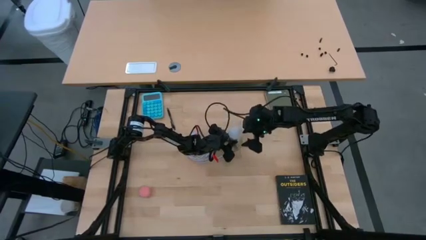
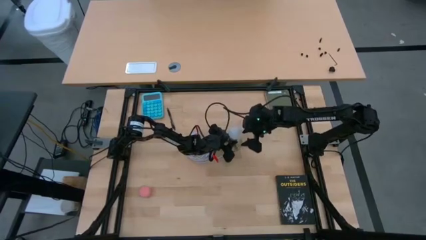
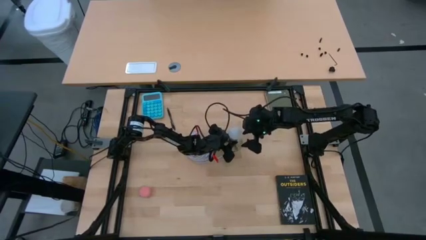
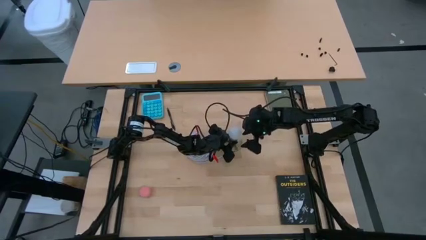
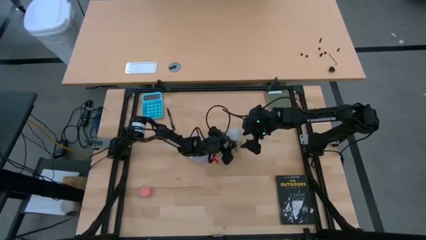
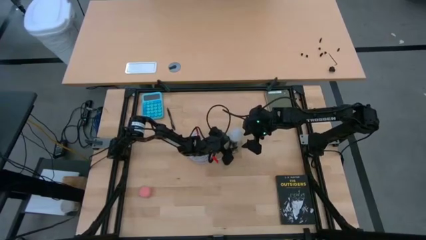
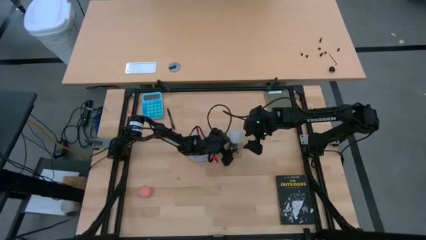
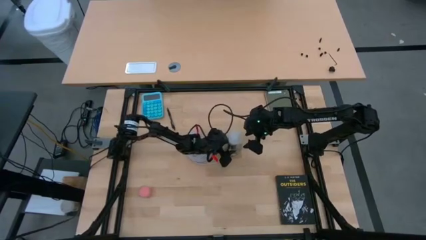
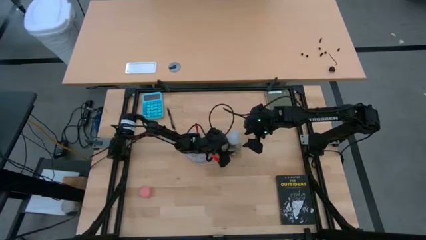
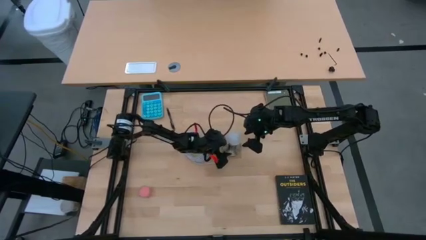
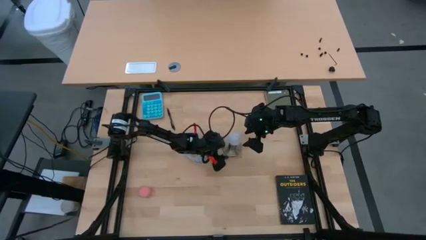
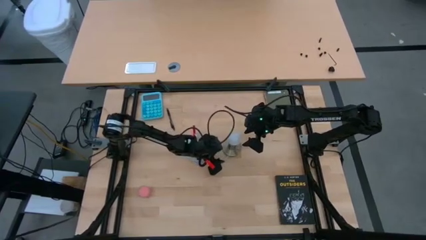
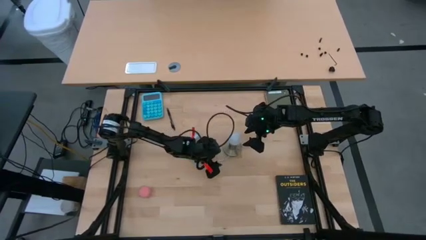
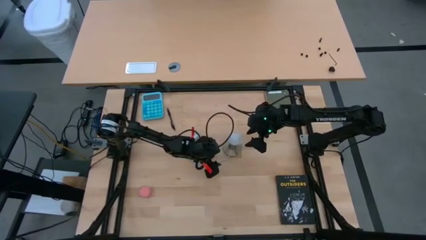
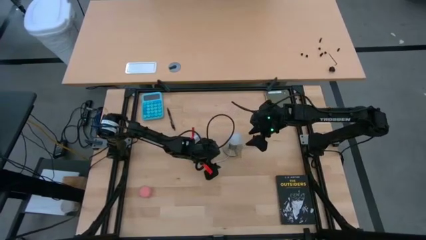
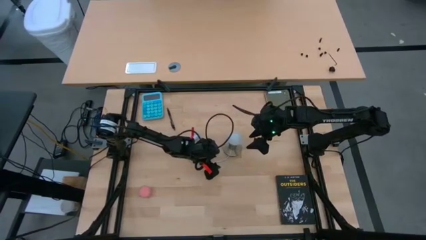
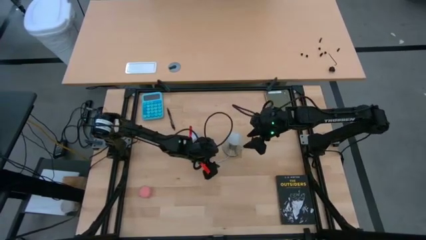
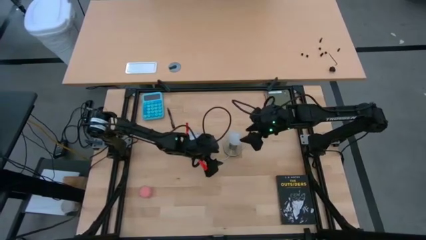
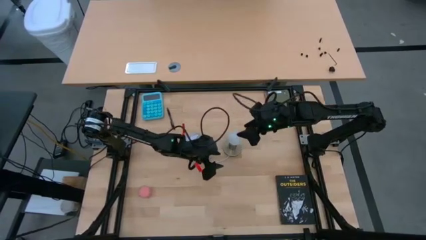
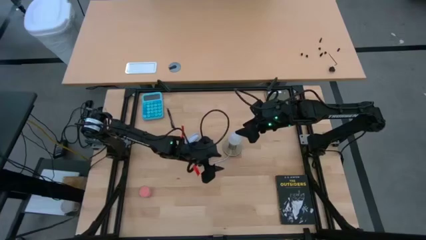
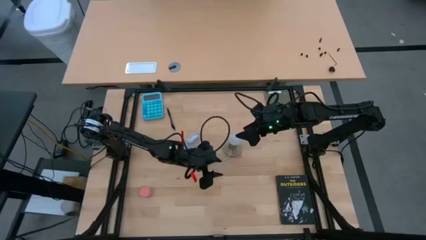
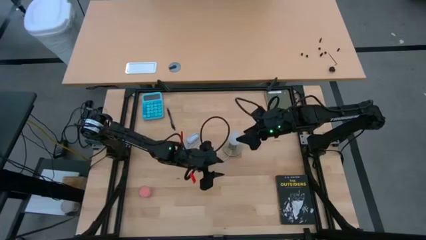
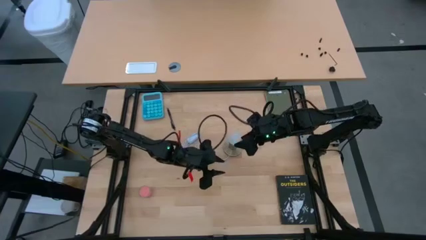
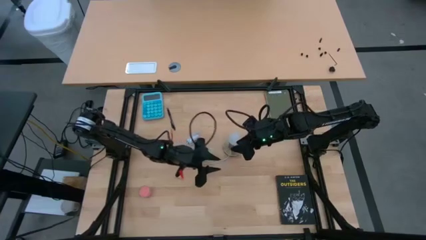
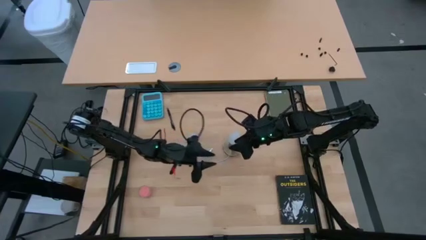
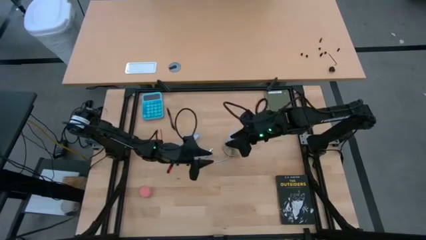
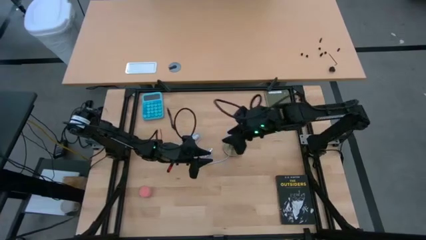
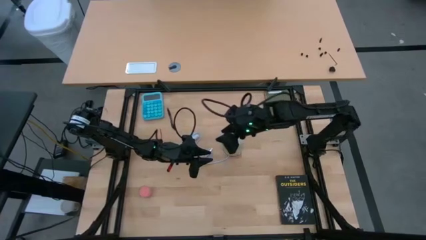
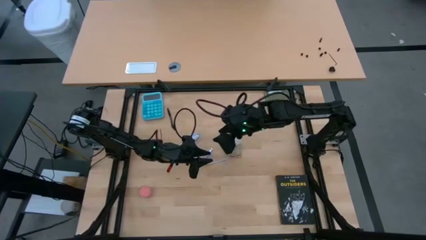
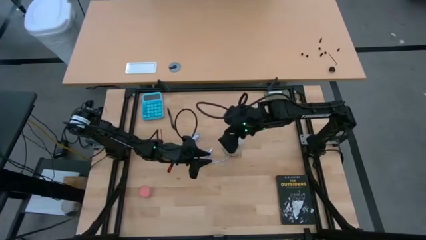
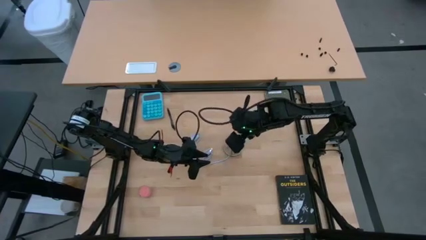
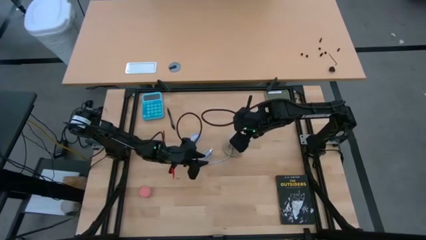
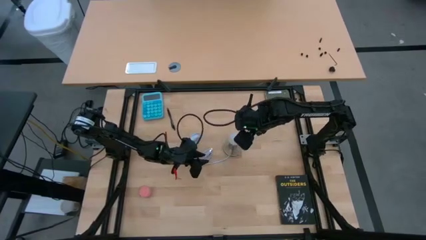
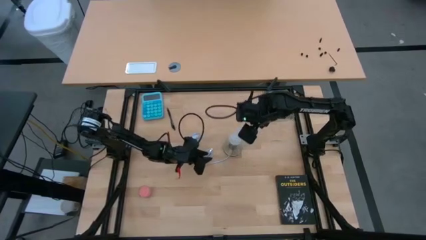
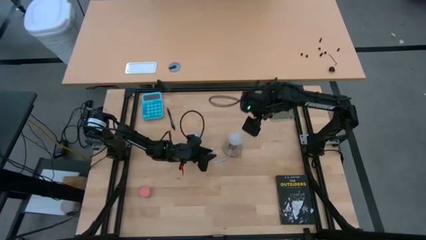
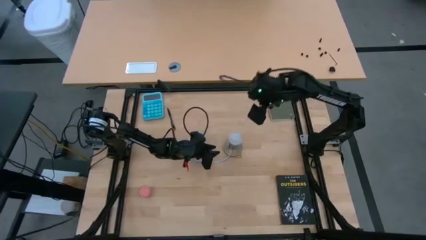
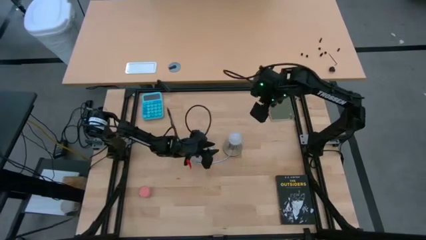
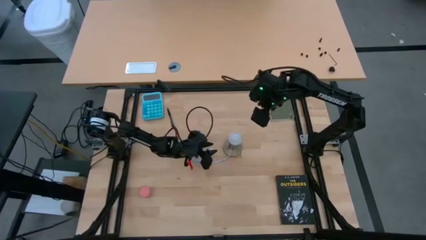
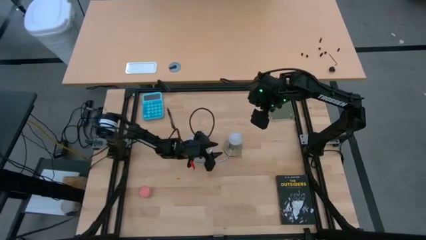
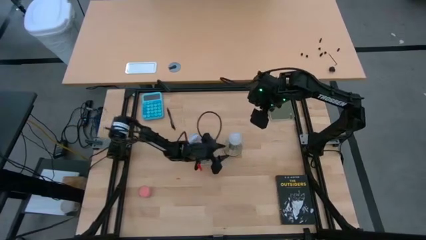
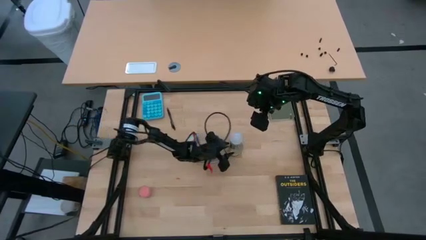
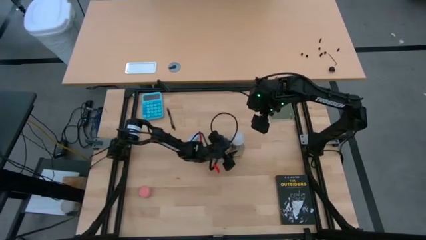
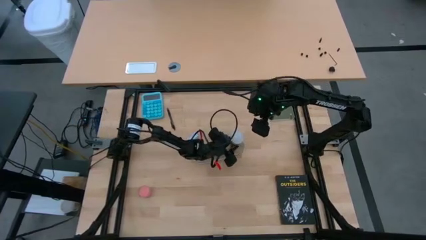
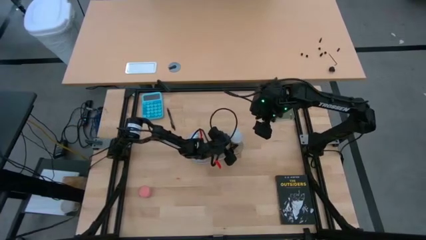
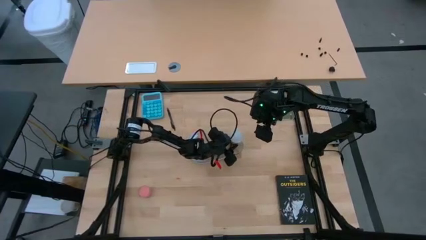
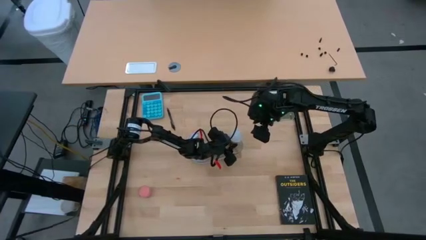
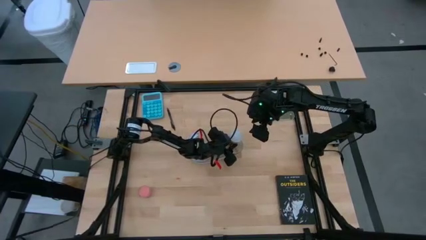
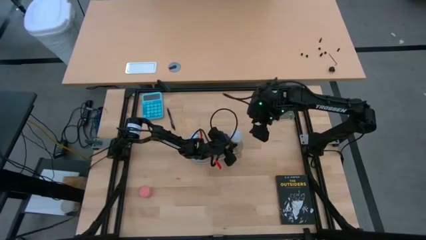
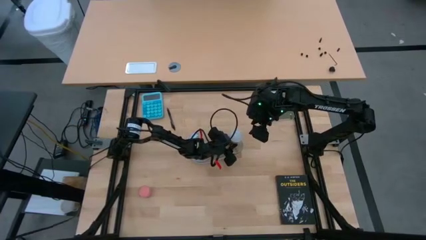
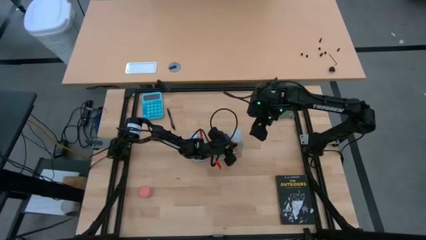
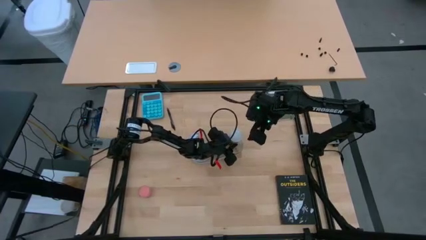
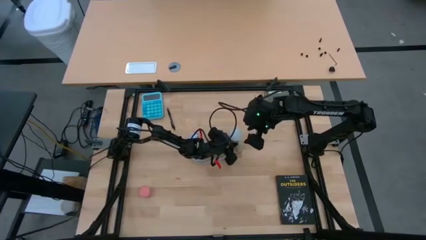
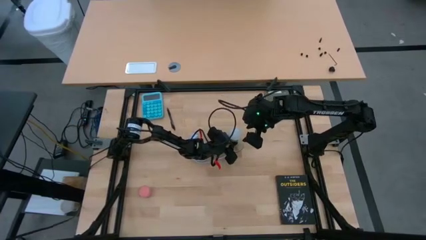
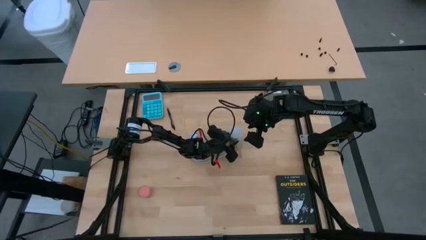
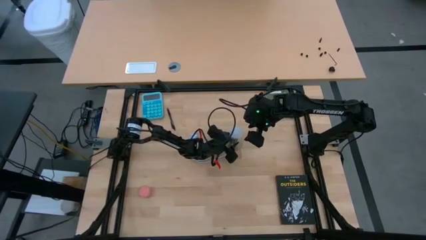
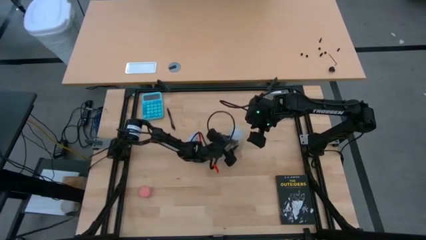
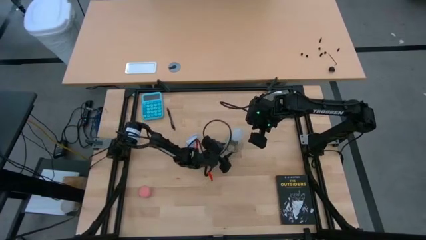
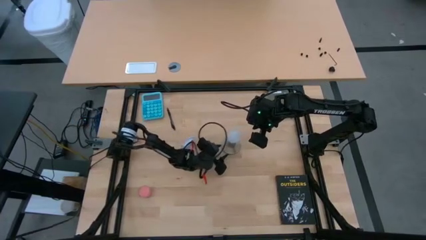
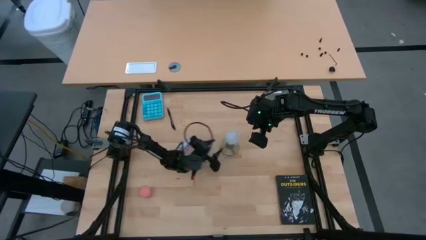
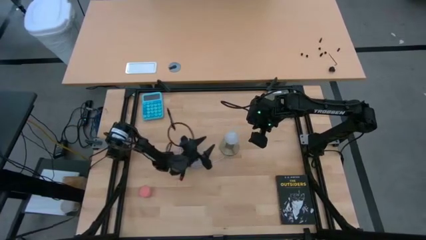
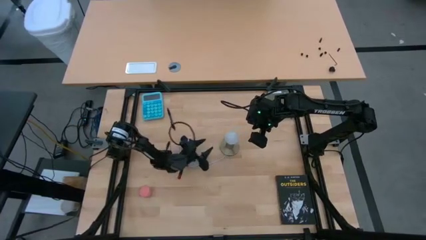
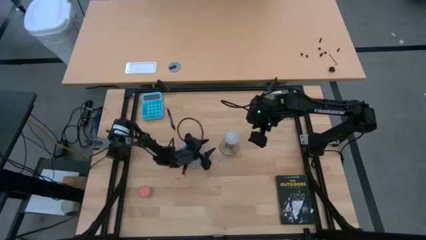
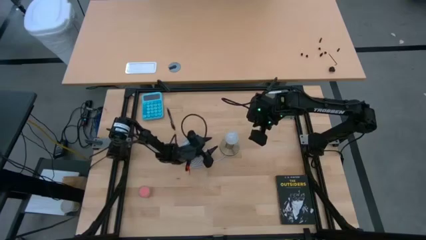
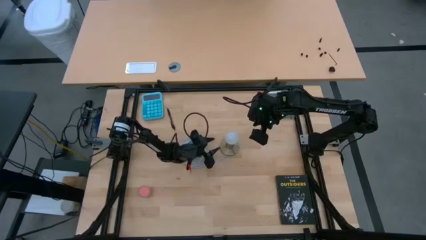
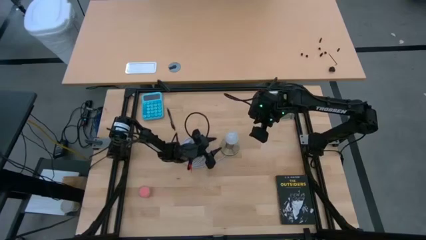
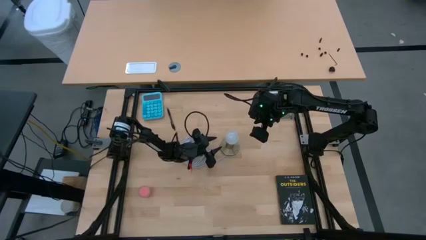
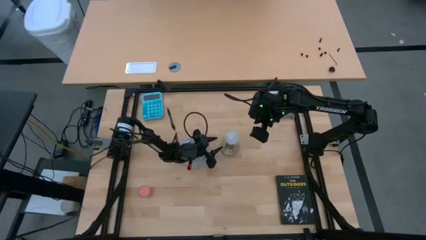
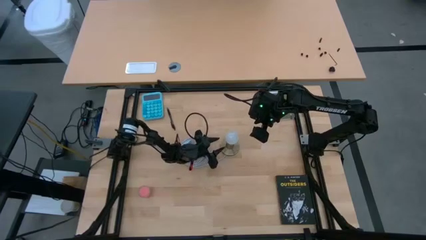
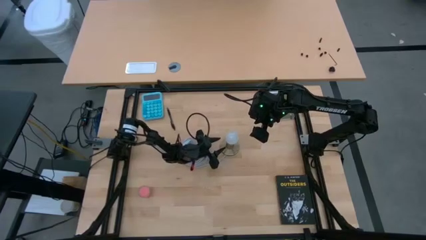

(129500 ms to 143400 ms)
Task: Screw lightbulb
Remove the white lightbulb from the desk lamp

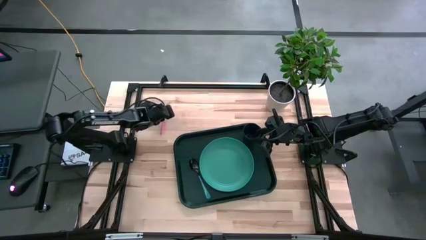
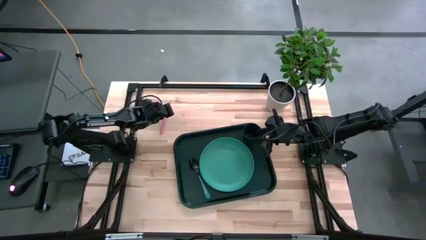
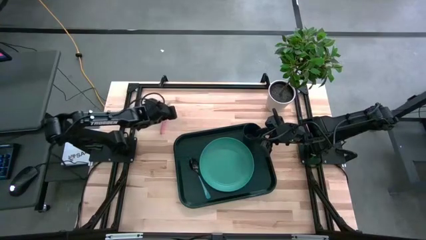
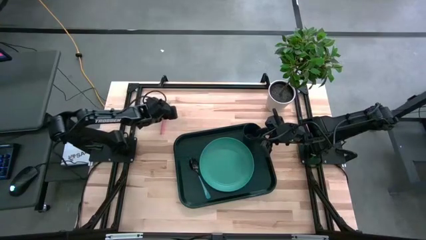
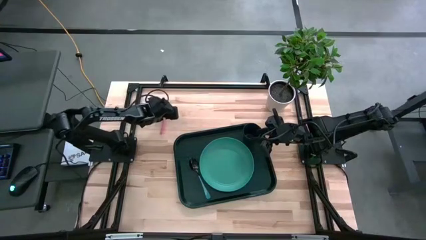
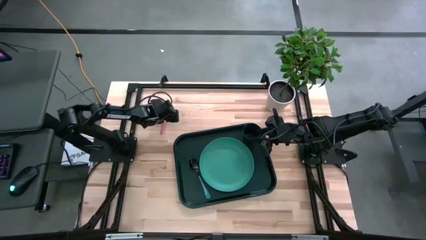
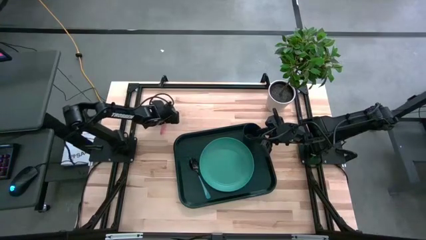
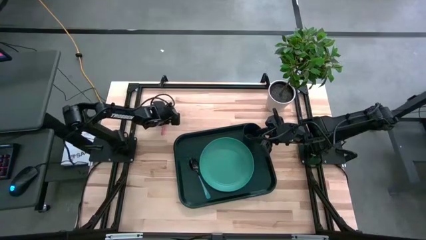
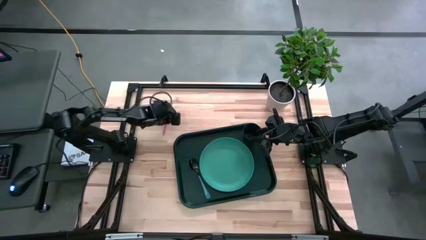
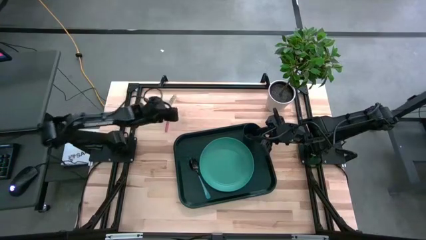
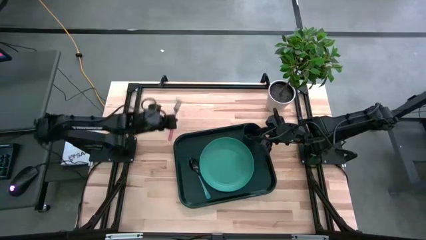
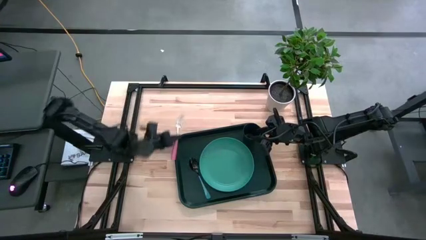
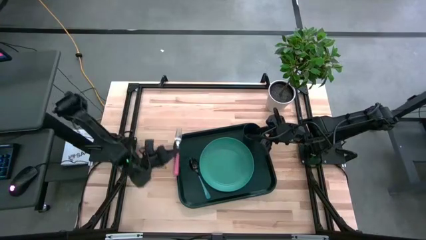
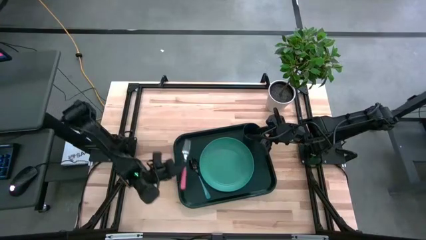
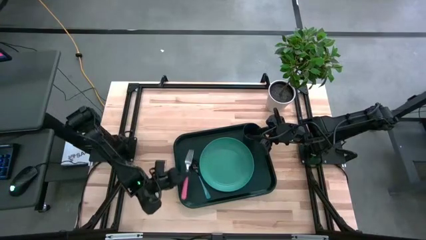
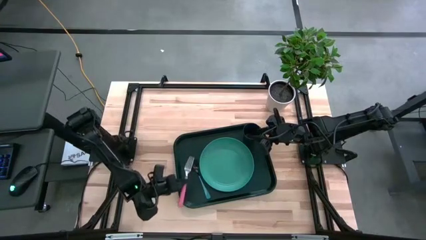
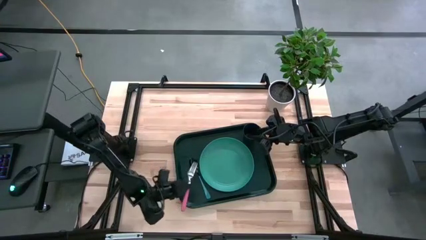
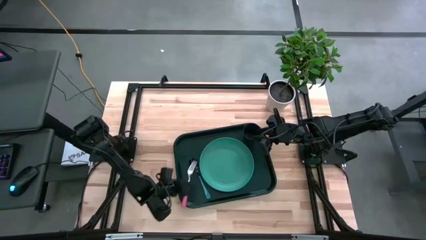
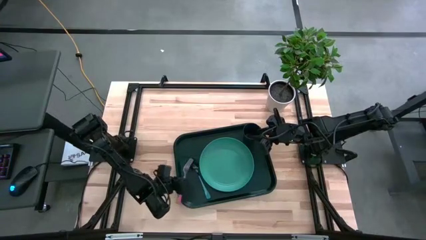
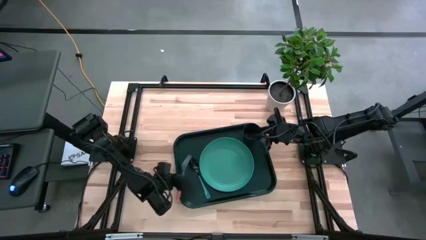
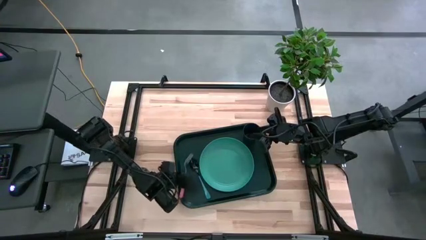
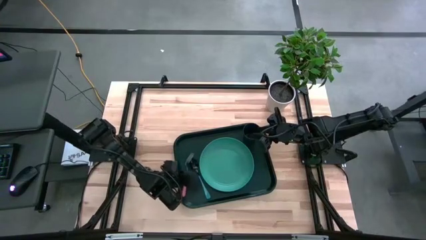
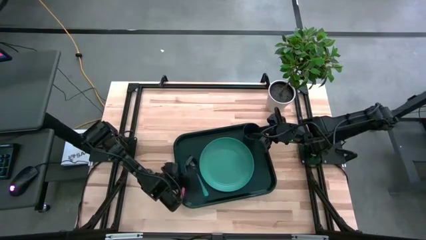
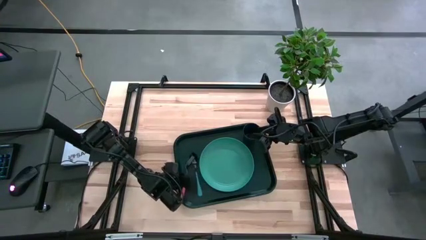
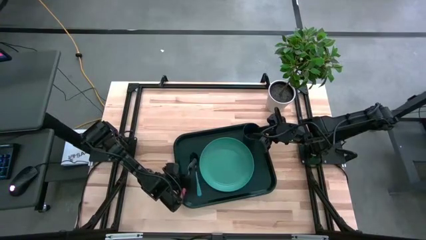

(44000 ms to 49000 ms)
Task: Pick and place plate/cup/fork/spoon on tray
Put the pink fork on the black serving tray to the left of the blue spoon
